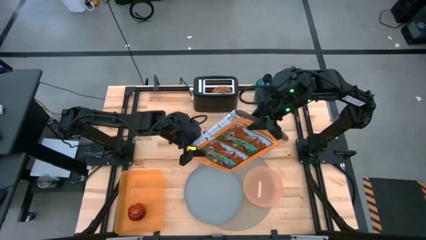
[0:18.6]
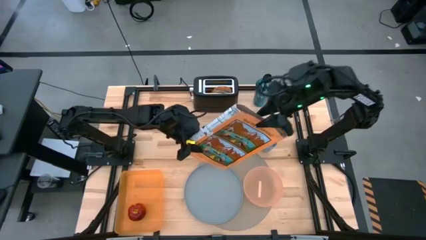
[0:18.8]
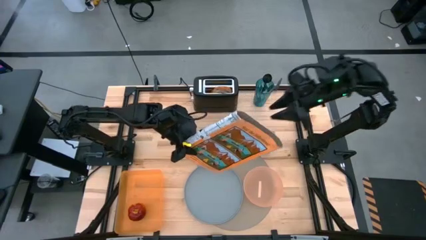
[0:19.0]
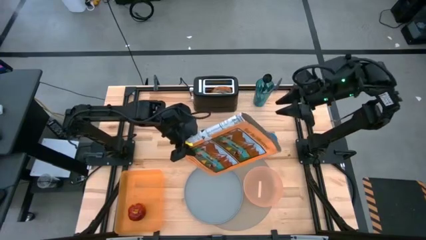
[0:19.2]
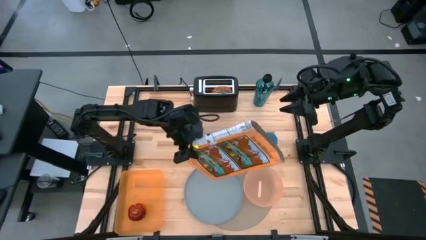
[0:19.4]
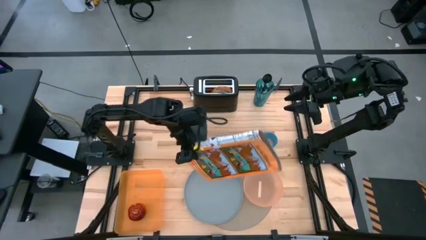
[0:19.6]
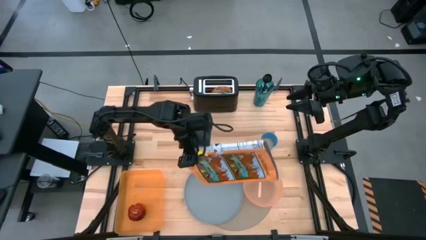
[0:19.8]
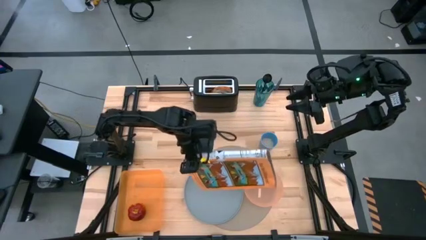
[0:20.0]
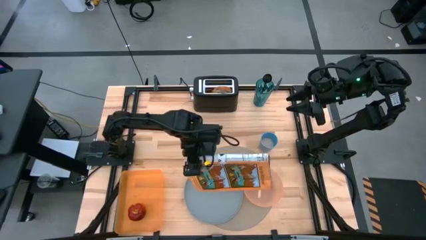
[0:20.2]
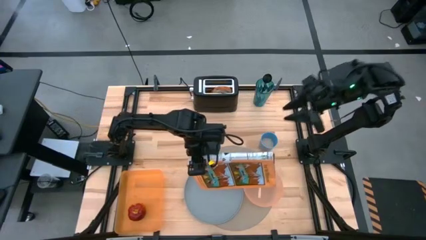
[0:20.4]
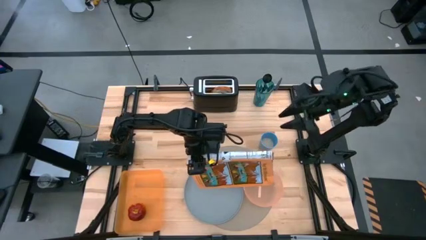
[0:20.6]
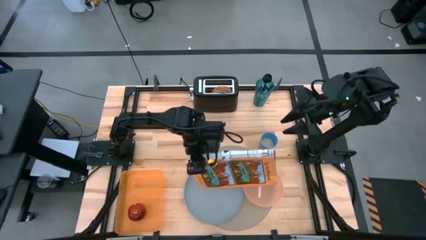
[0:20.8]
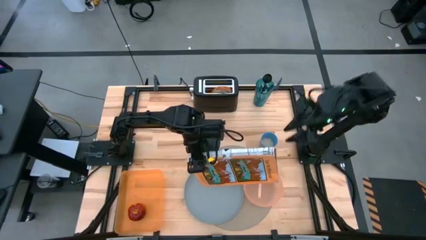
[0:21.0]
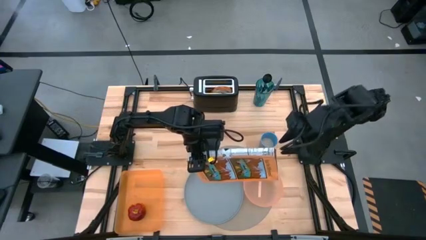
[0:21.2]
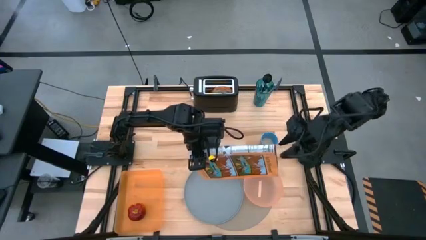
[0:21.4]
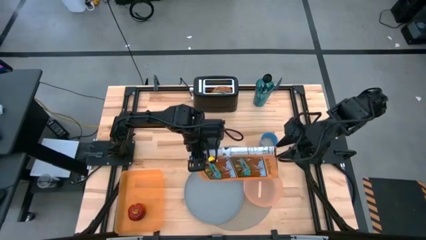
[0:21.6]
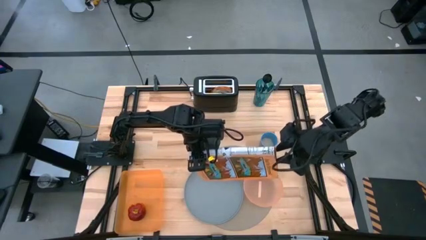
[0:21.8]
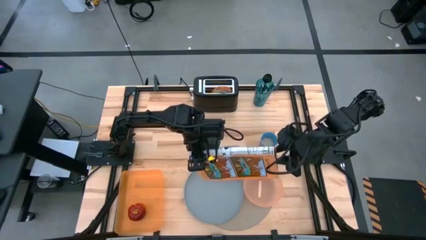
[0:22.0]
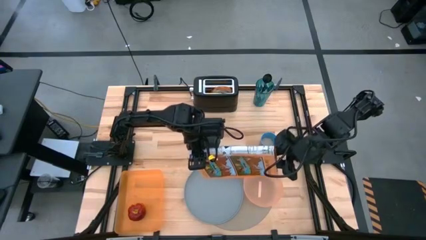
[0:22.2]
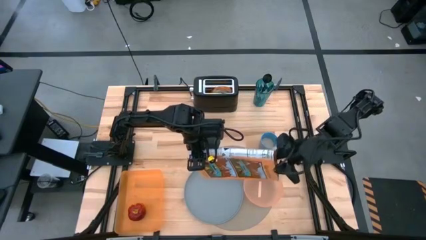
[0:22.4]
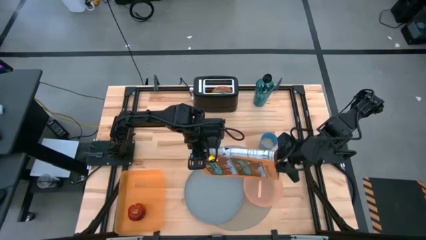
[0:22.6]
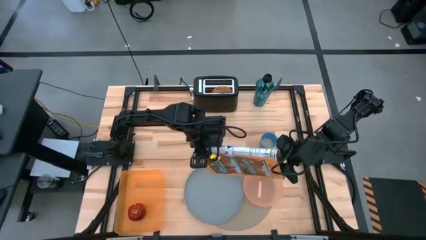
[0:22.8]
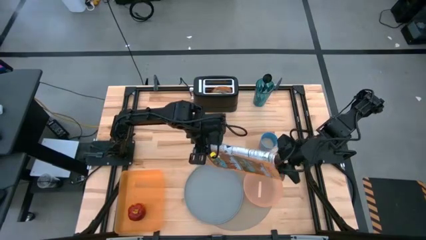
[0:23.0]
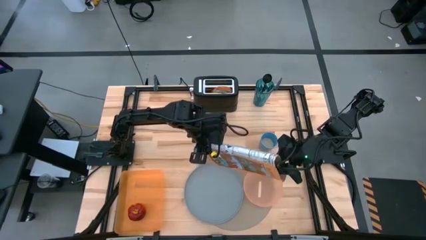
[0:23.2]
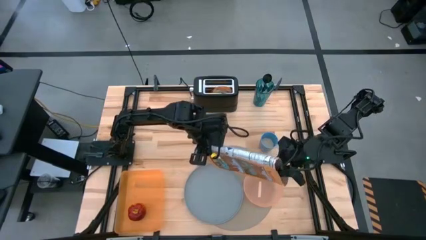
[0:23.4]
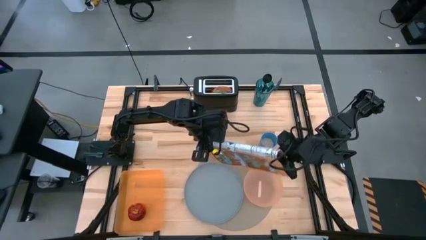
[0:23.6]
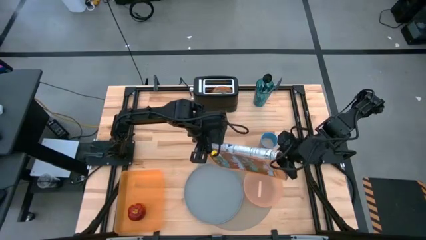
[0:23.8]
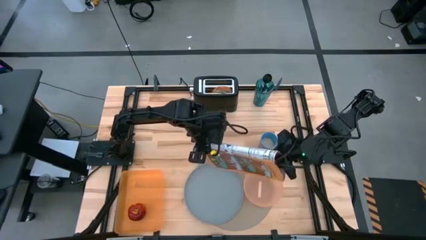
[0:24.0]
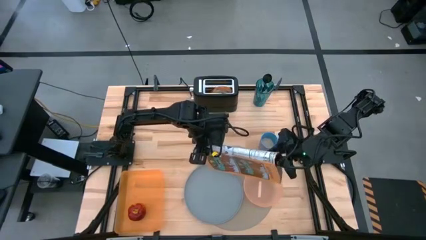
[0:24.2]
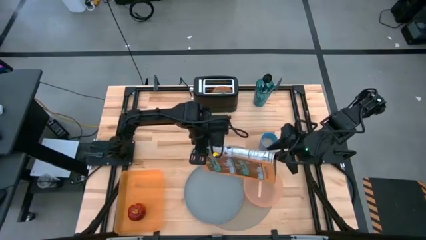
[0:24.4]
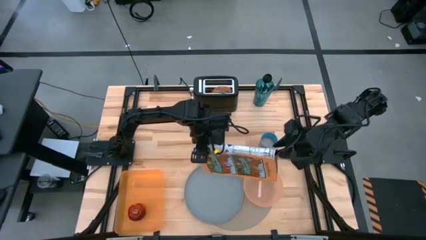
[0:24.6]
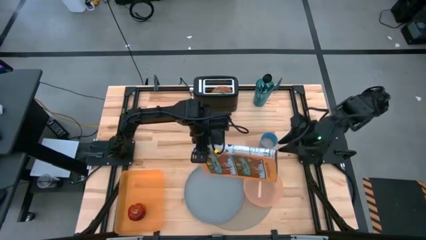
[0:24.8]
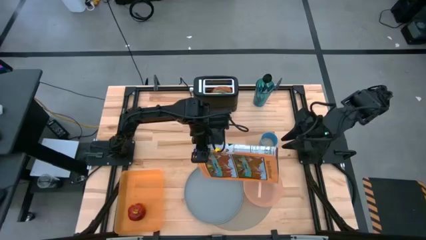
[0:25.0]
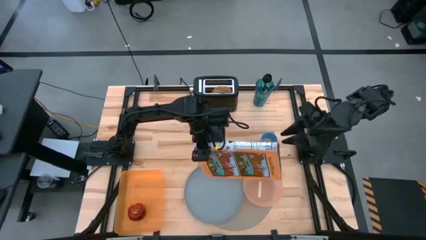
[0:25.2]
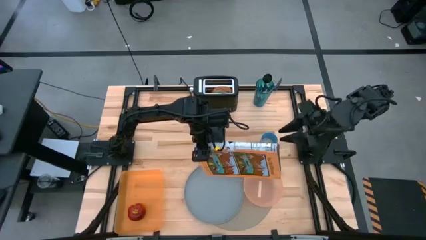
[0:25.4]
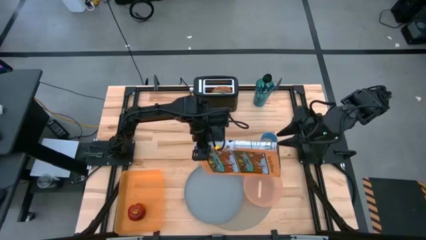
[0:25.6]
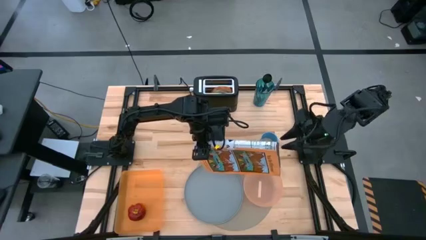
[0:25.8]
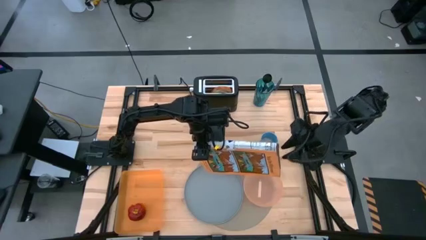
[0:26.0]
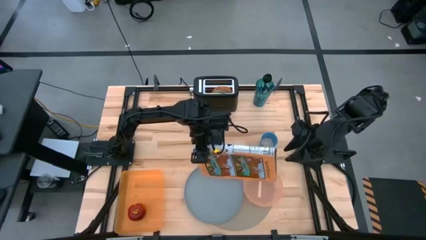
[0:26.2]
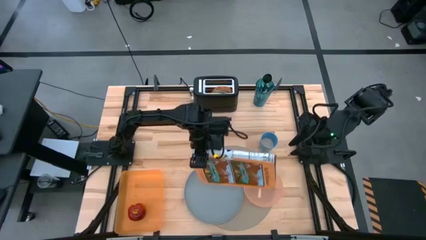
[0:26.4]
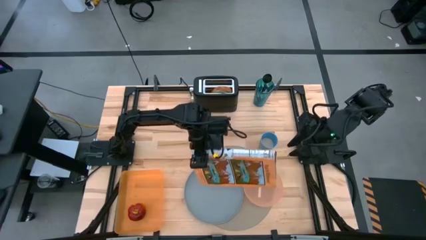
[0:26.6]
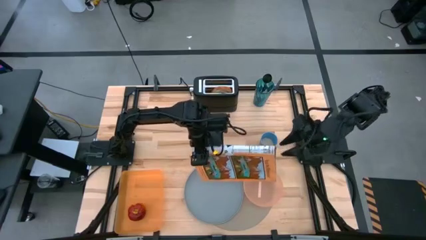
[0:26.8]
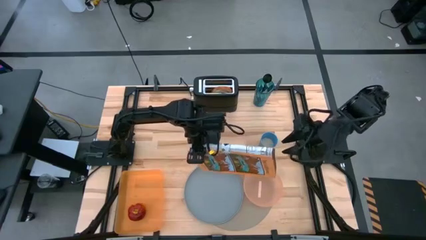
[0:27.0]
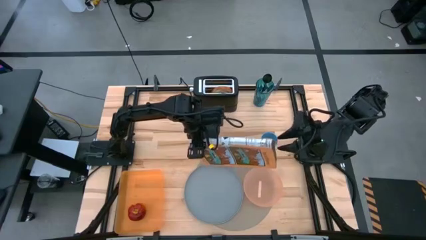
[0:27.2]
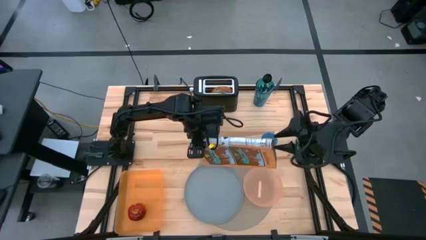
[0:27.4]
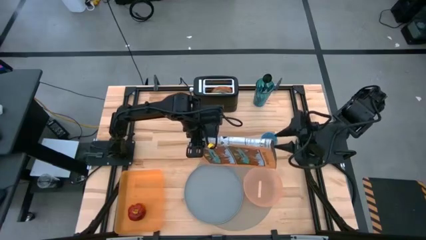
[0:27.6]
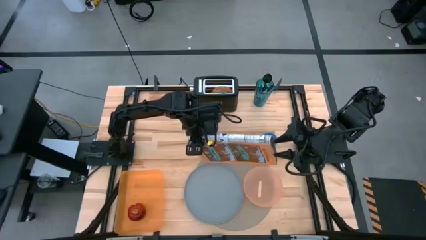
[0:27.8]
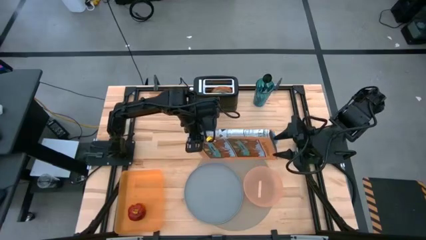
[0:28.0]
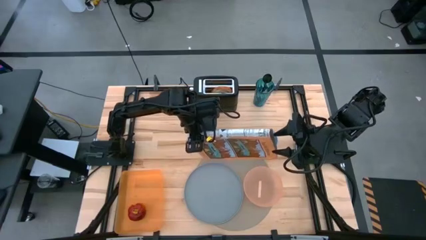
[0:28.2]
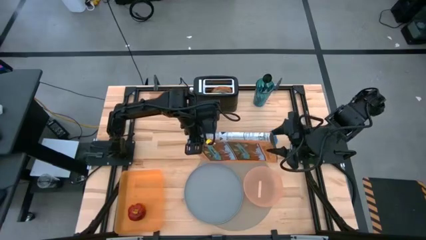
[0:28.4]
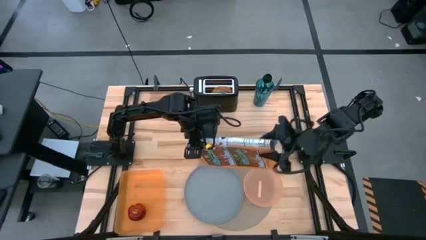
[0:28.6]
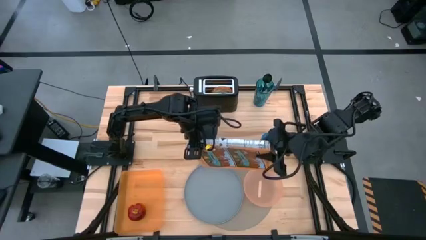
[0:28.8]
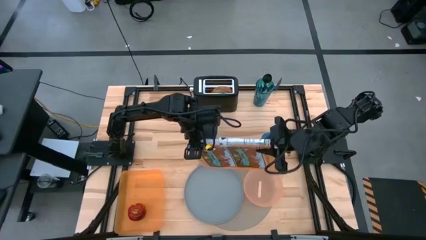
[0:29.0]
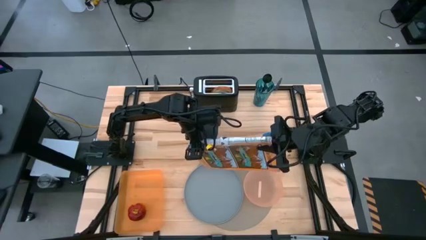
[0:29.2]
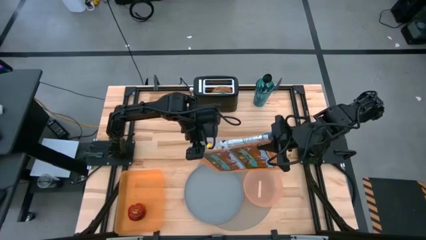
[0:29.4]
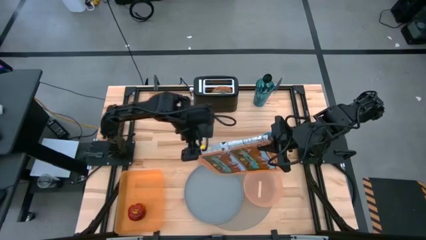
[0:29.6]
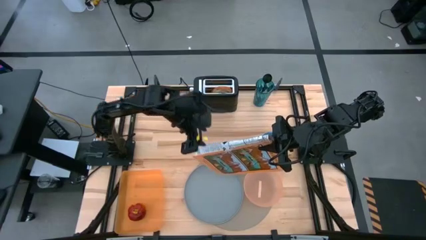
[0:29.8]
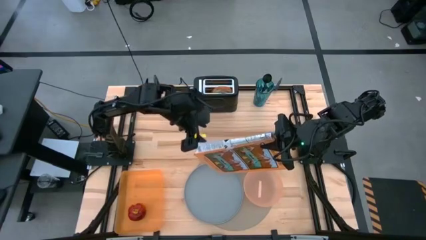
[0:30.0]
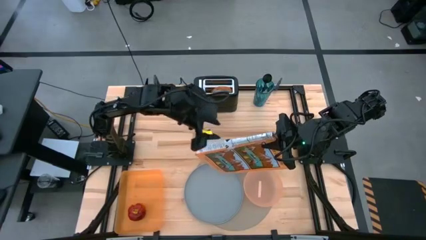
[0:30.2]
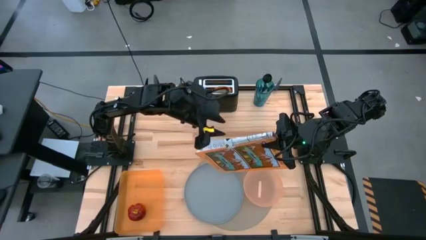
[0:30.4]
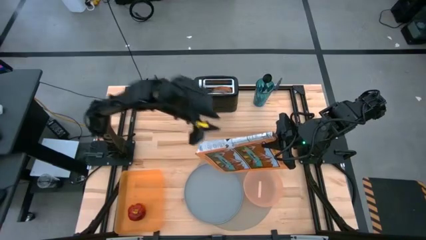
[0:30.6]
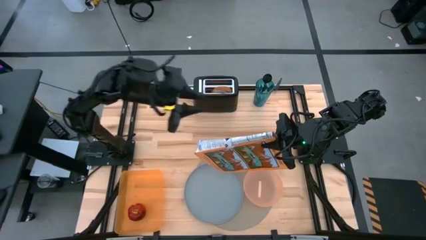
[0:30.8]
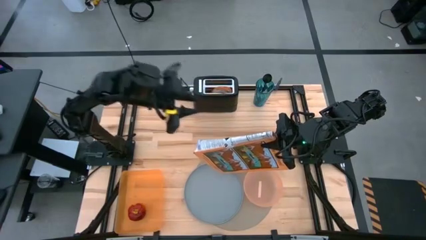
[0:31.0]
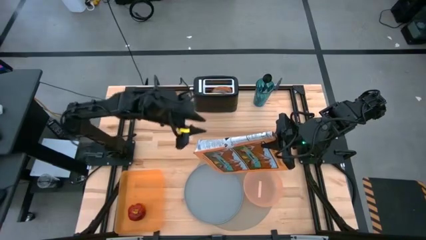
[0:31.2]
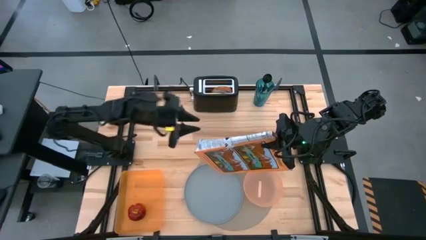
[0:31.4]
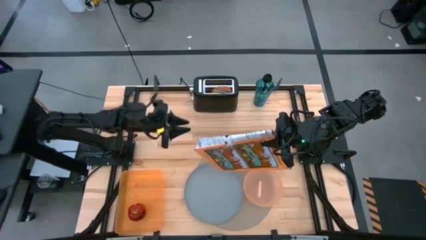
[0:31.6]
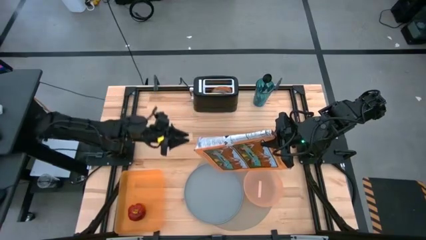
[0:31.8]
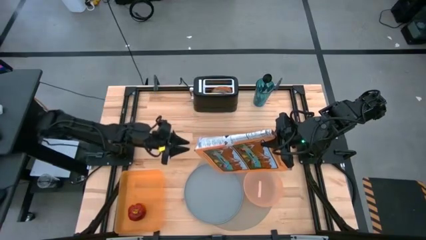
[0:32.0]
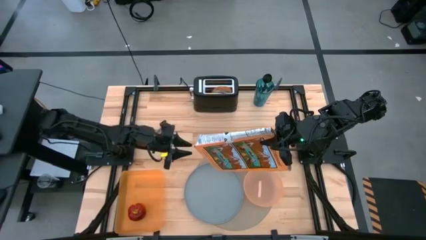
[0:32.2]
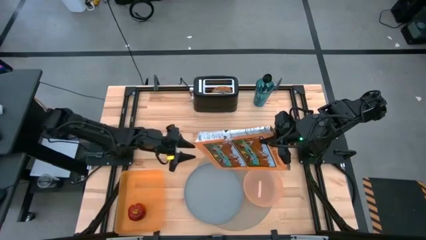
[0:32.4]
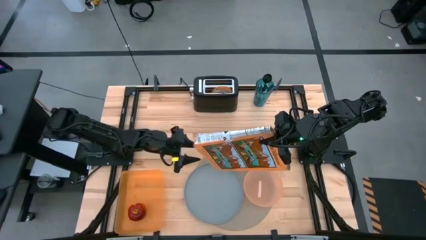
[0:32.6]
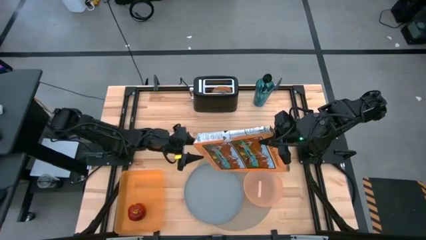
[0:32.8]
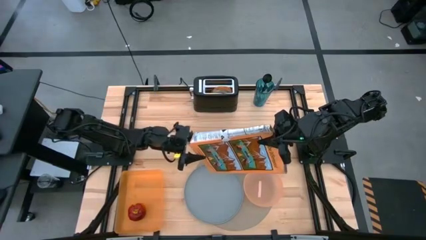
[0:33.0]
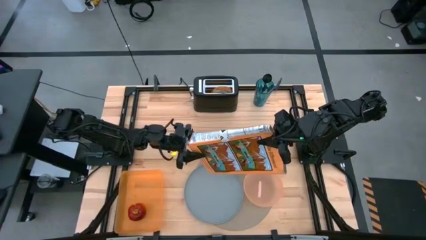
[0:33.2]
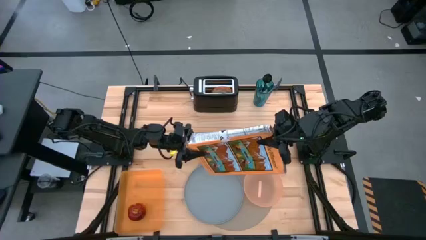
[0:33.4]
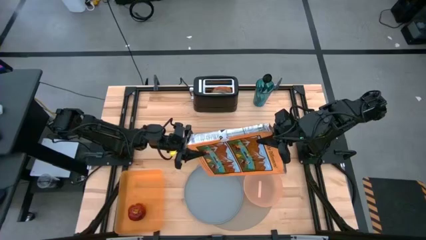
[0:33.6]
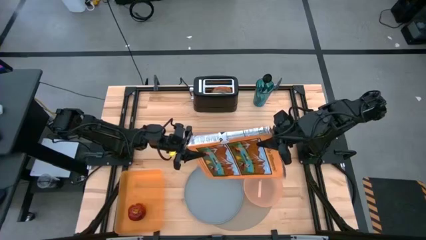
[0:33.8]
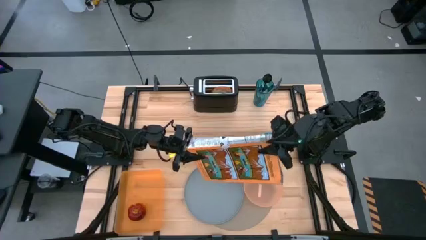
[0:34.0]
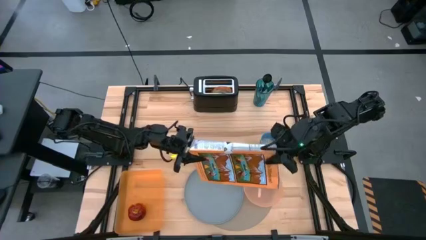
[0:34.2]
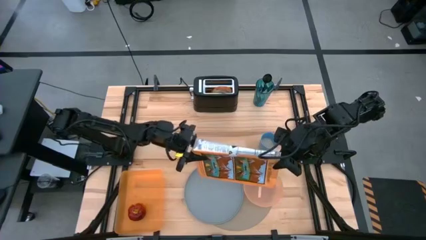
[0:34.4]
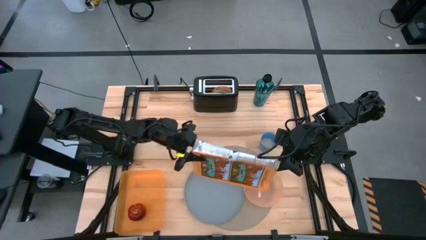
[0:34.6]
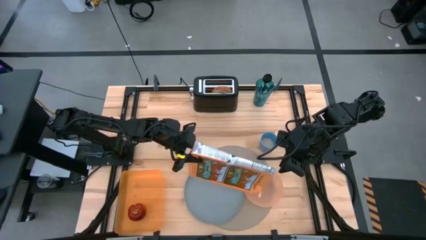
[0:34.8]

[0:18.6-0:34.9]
Task: Arrange a breakfast setting
Pour the cereal into the light orange bowl on the table mat
